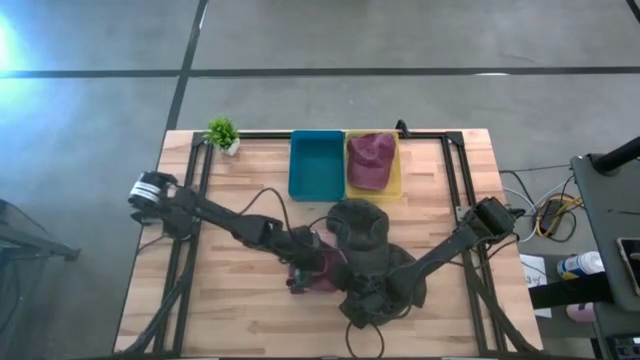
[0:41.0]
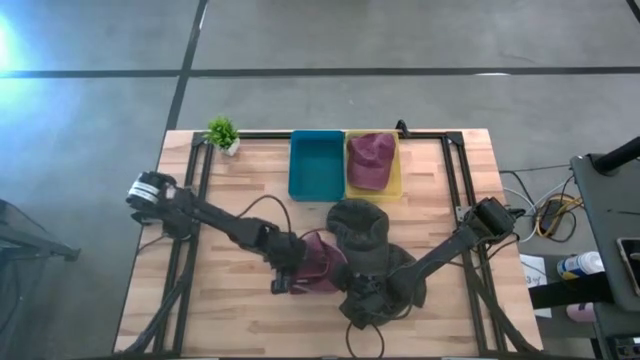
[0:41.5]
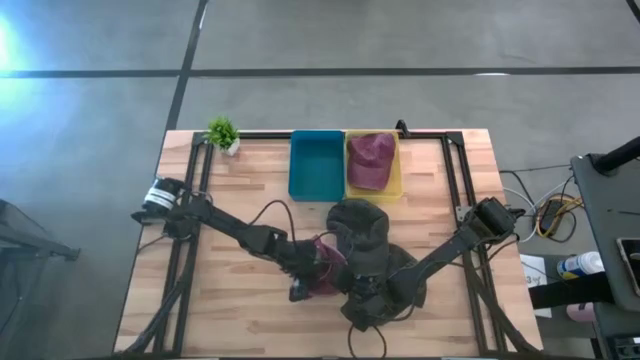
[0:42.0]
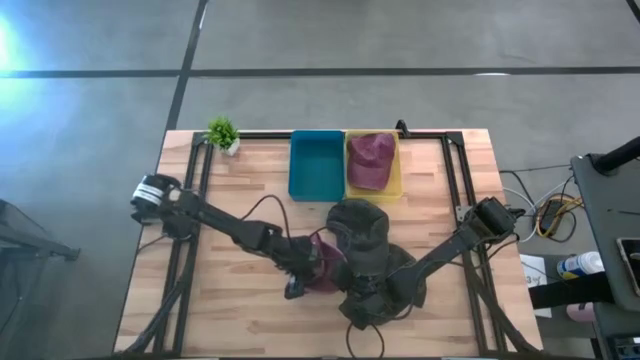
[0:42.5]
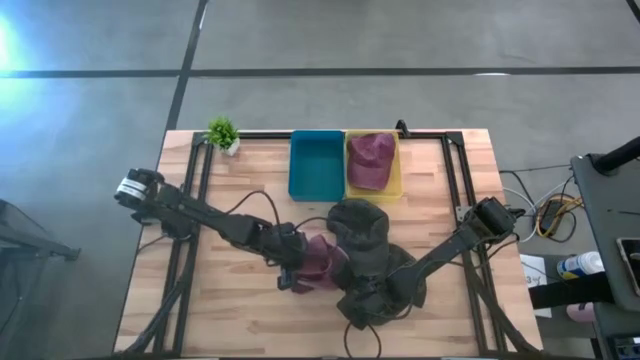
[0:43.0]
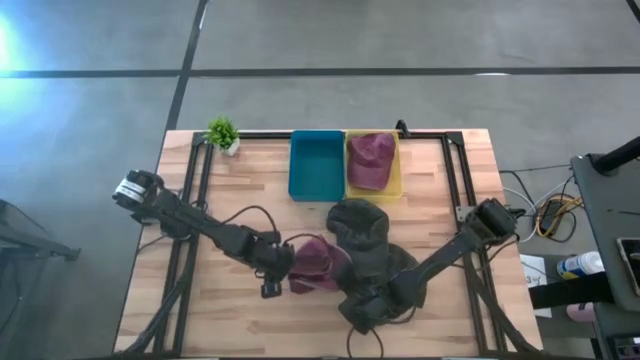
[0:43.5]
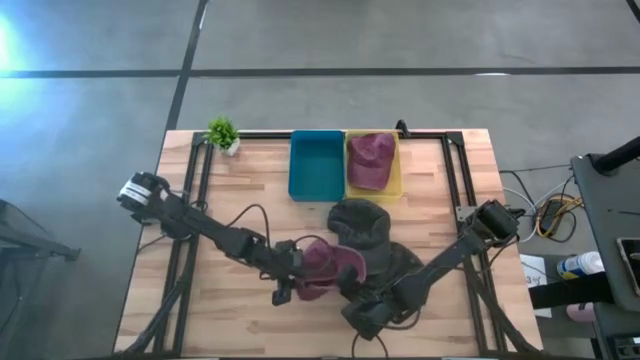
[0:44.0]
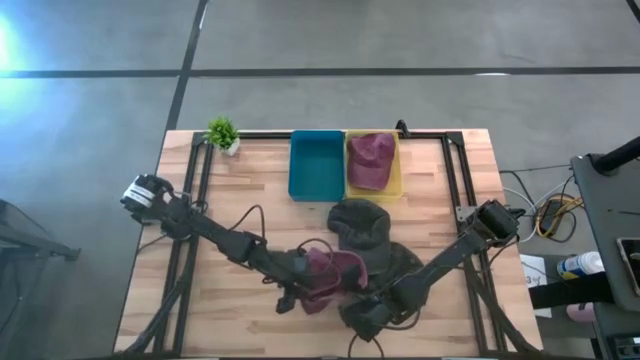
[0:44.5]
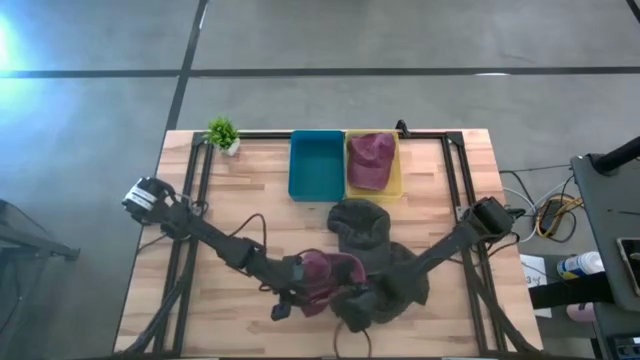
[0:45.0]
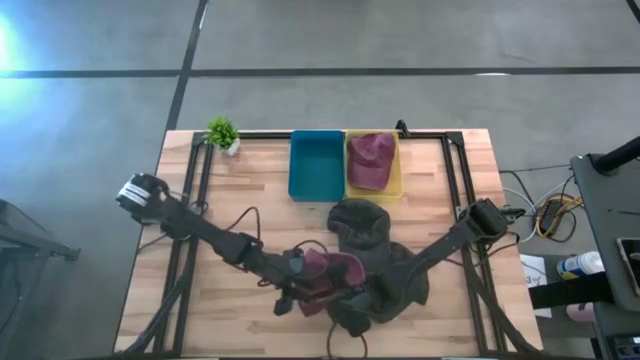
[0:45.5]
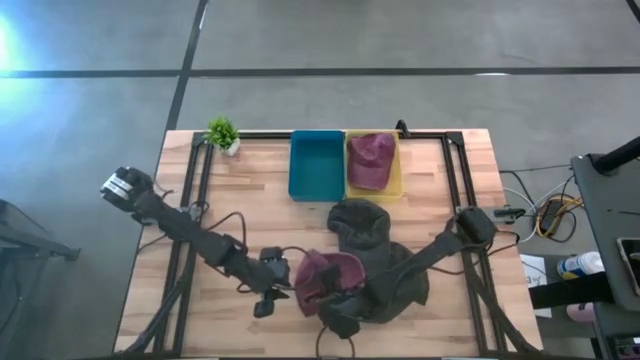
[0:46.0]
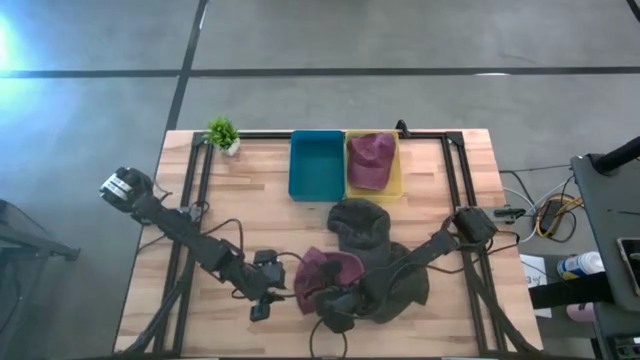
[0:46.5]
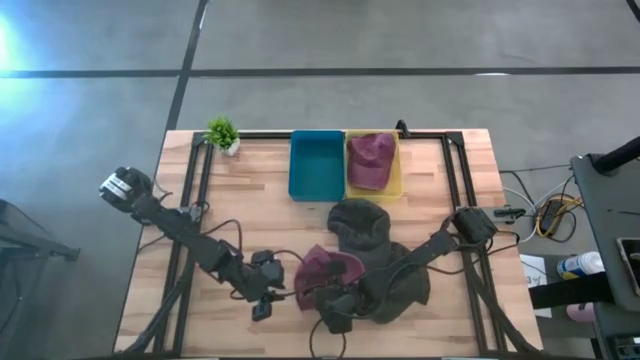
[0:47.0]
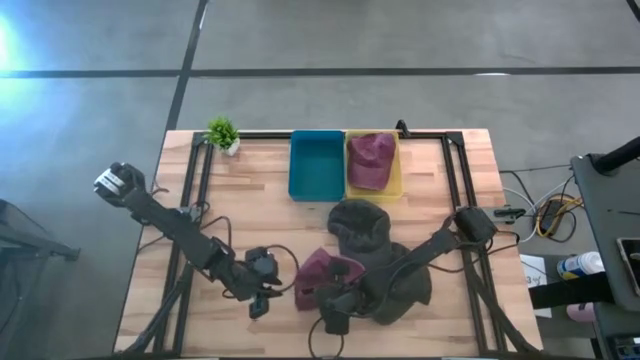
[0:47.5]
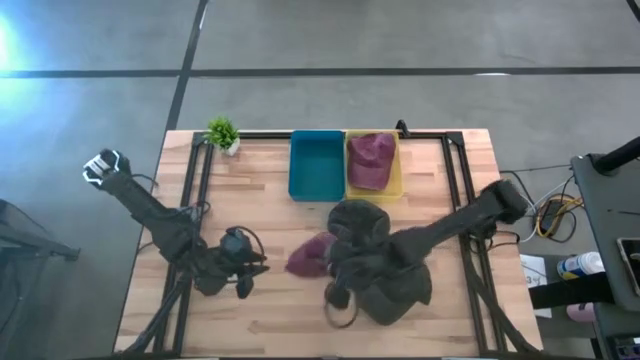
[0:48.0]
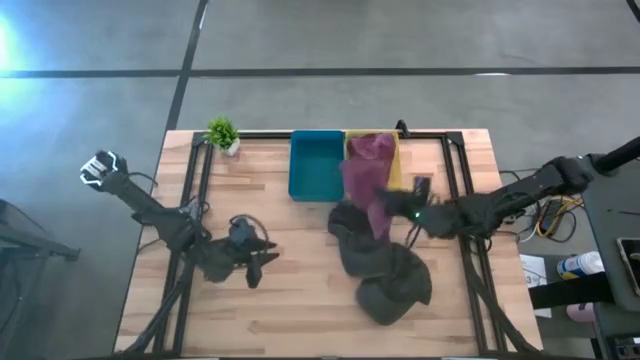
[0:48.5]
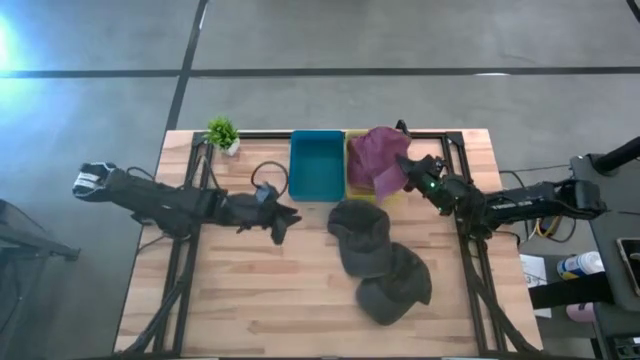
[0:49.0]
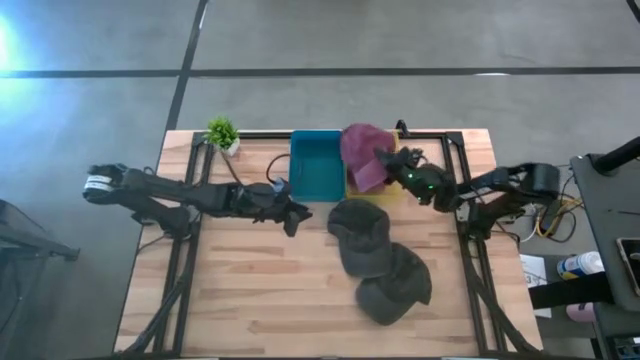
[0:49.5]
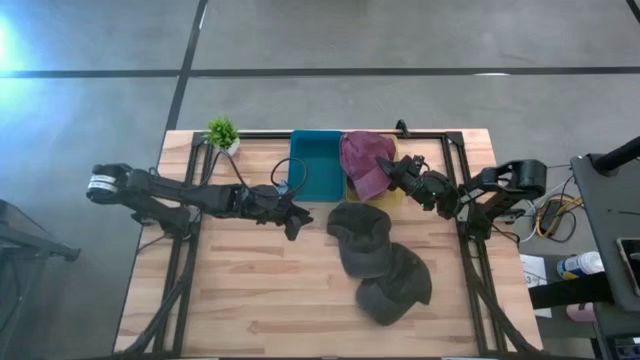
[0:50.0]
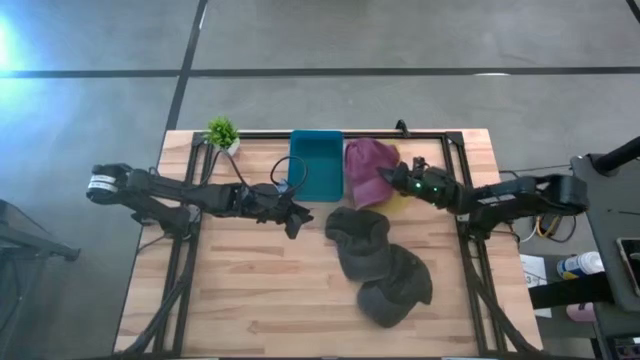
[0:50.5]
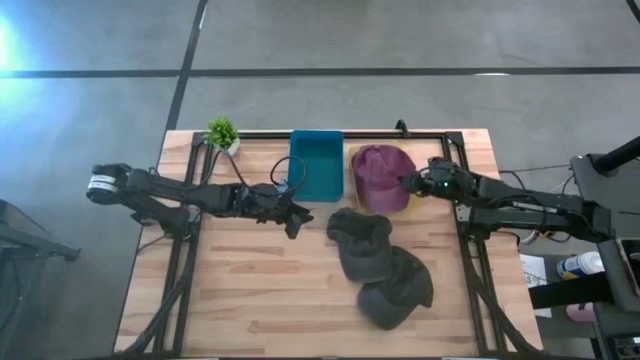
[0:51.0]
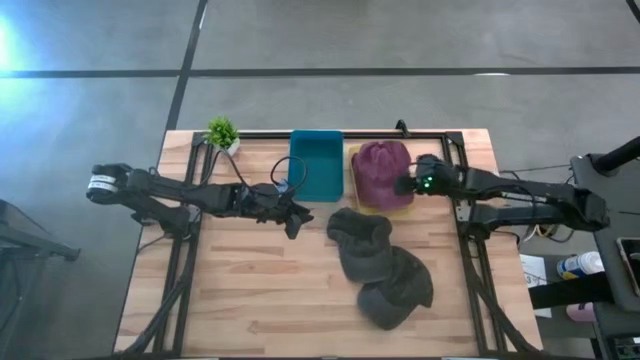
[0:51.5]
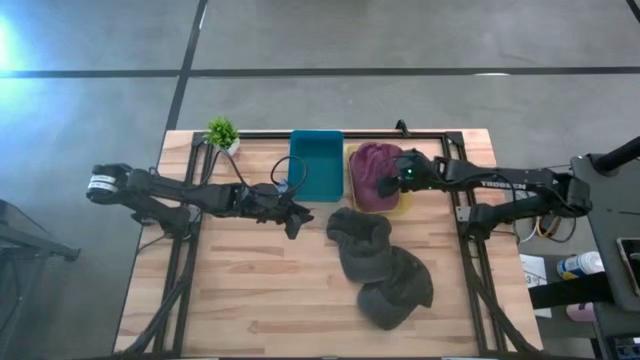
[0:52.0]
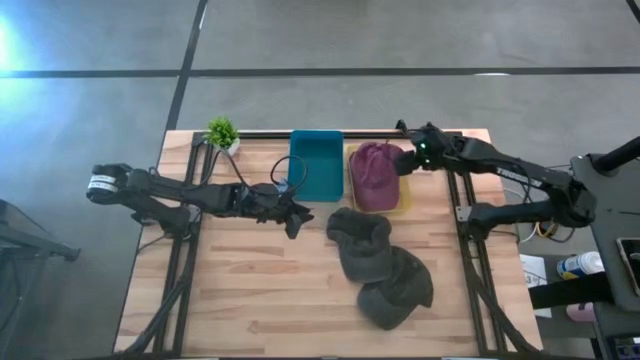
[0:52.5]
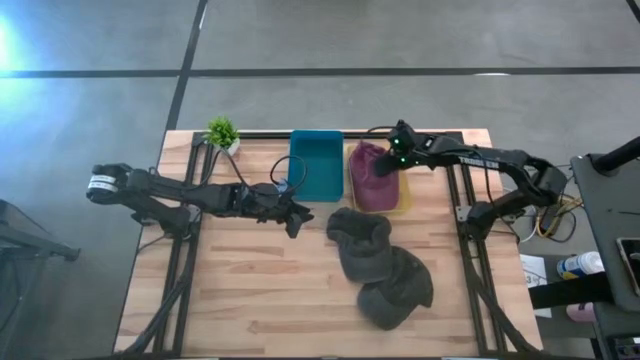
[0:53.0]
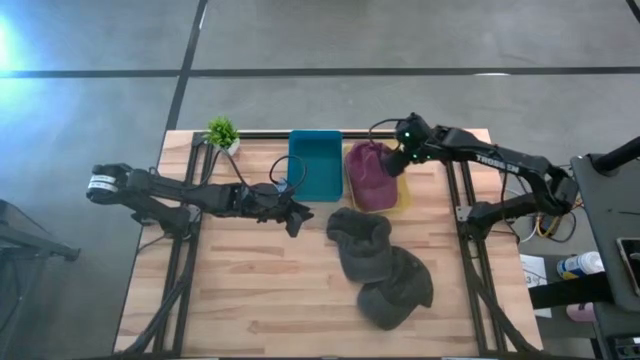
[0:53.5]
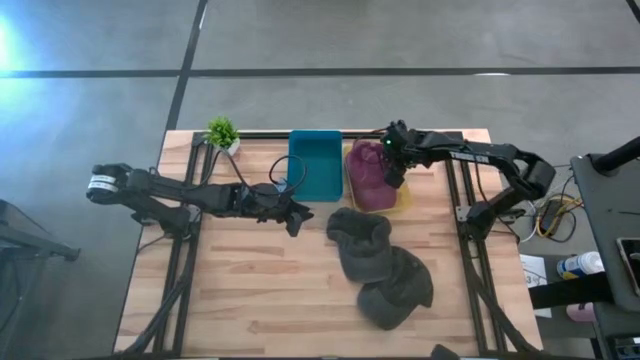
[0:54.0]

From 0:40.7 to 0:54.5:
Task: Pick & Place hat
Put the red cap into the yellow bin

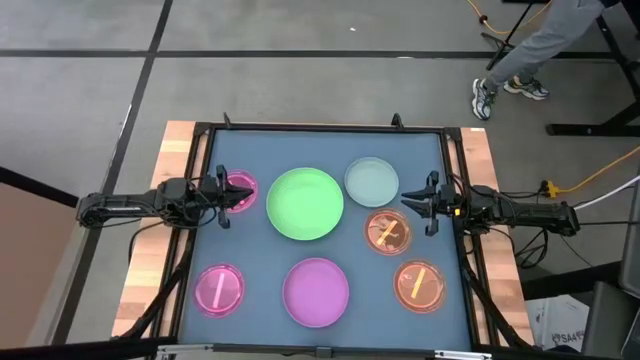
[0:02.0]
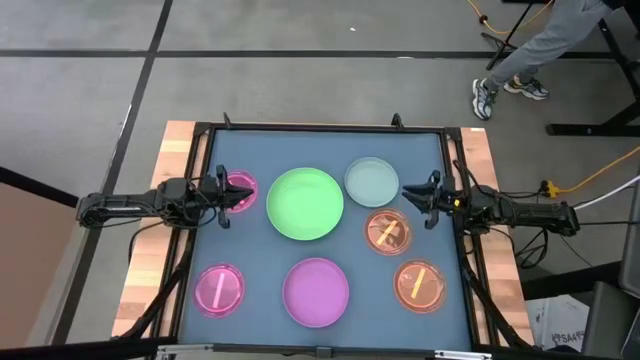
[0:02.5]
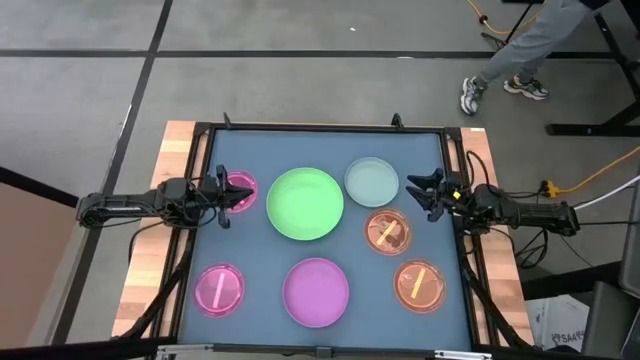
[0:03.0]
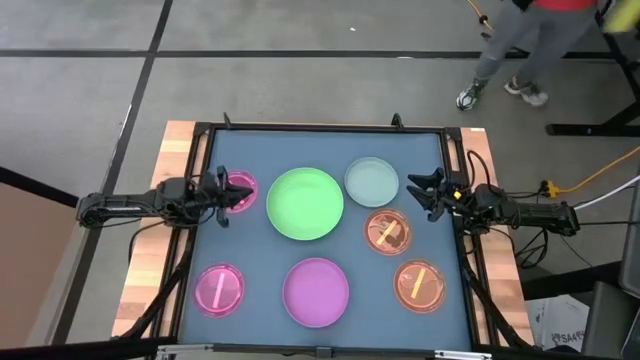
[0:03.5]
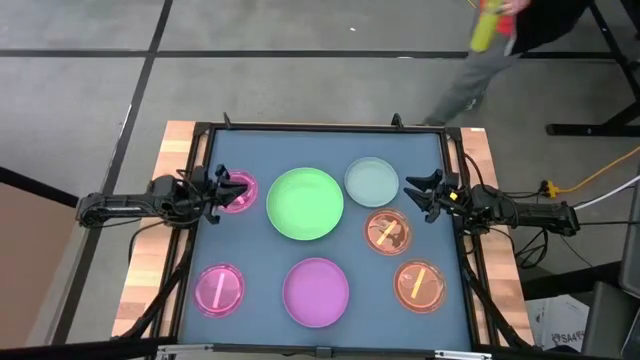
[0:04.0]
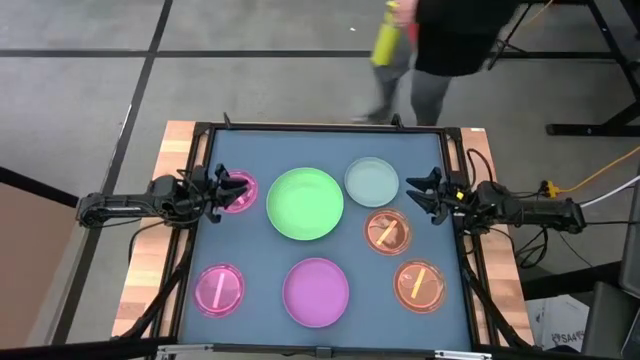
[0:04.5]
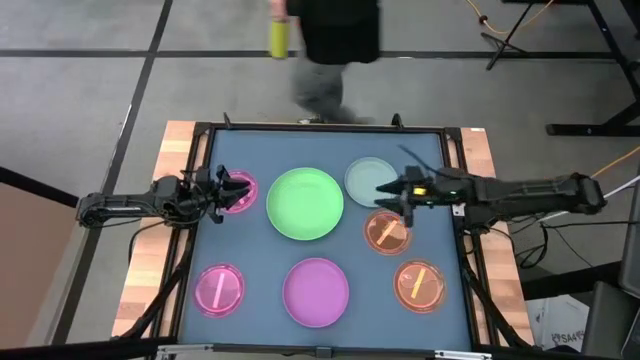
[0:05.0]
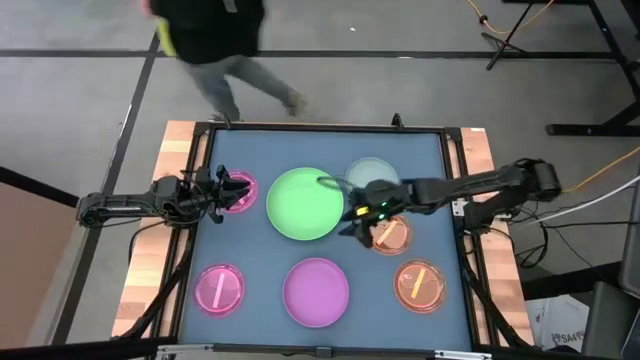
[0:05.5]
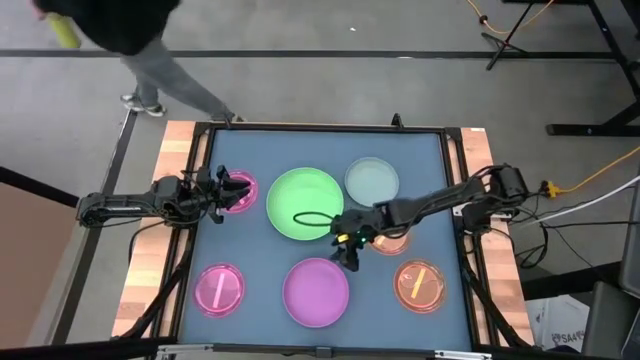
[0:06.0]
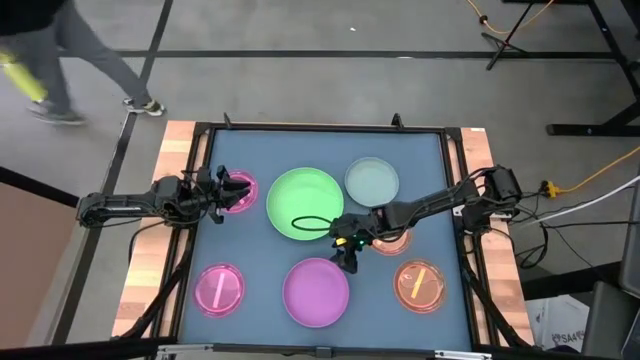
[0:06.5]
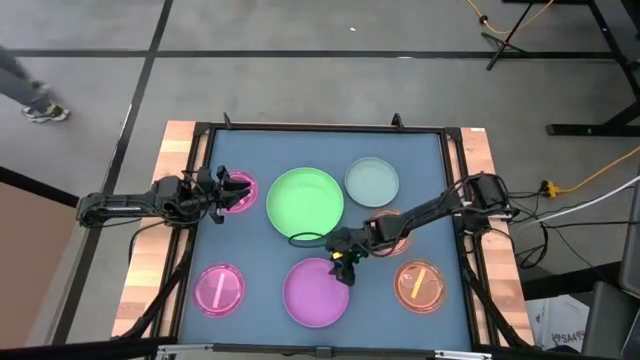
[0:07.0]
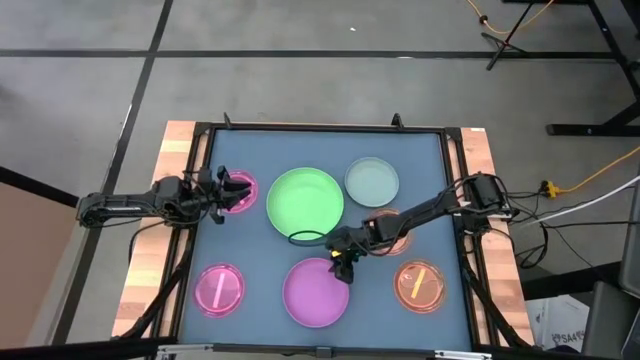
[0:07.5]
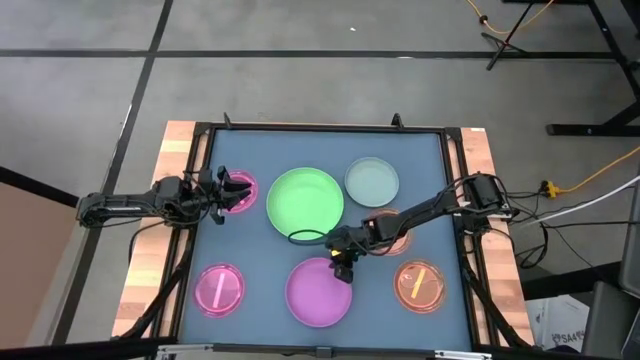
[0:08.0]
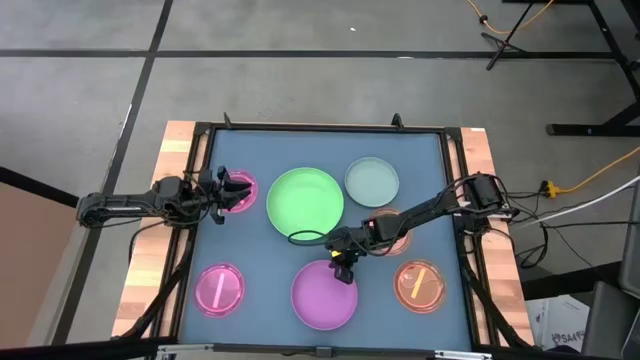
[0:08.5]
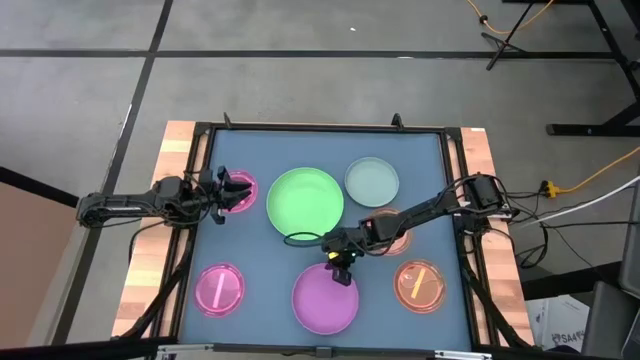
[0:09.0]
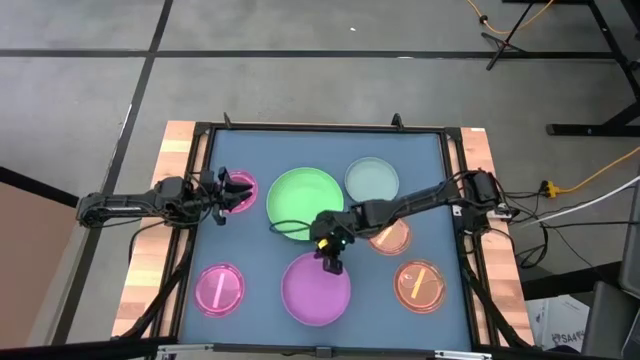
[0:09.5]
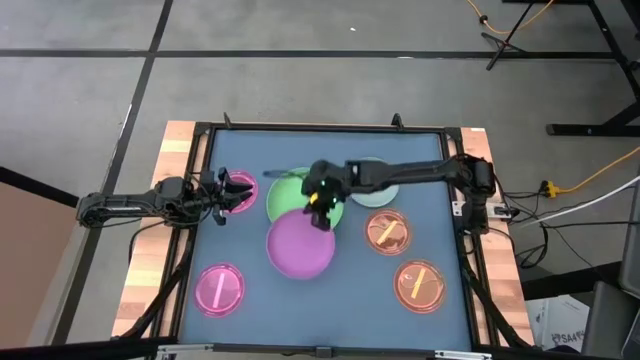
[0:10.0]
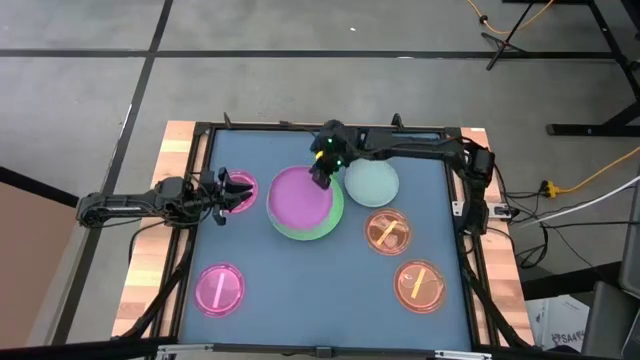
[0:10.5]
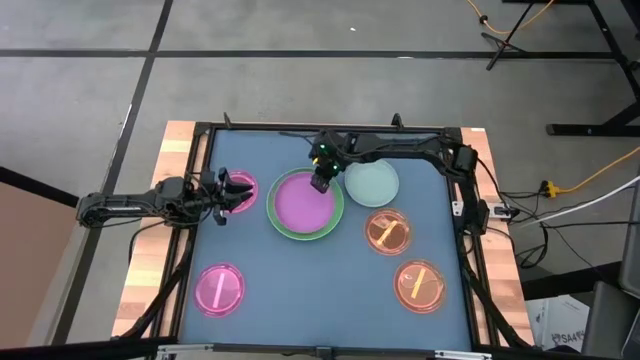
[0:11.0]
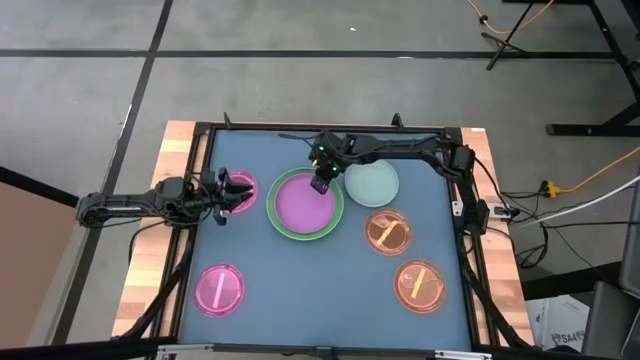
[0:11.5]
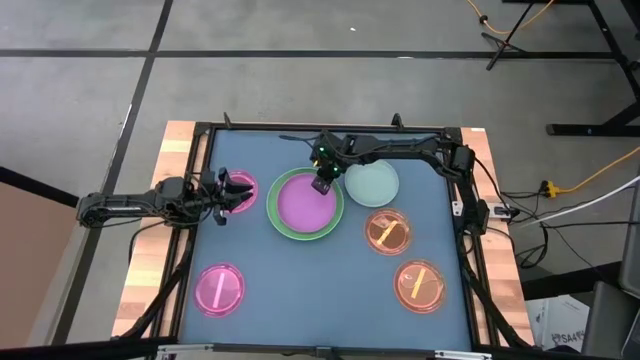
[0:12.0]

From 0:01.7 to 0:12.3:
Task: Stack plastic plates
Stack the pink plate on the green plate
